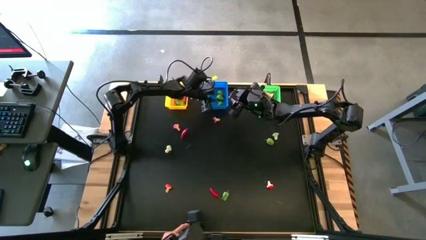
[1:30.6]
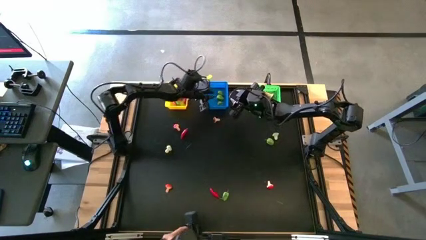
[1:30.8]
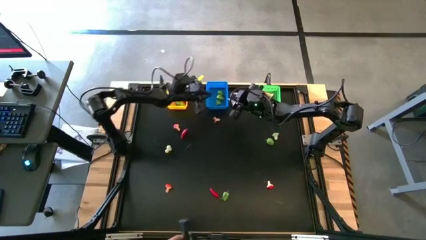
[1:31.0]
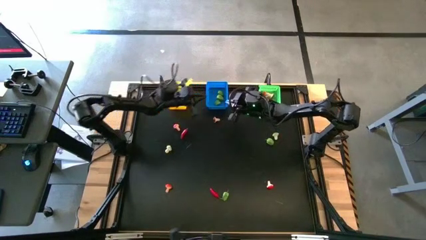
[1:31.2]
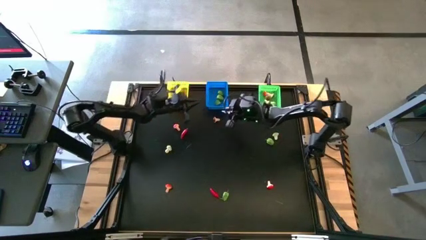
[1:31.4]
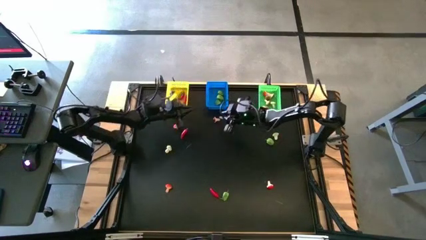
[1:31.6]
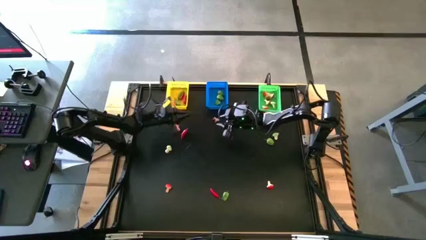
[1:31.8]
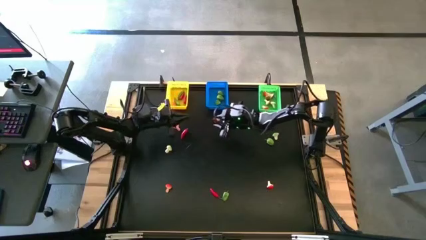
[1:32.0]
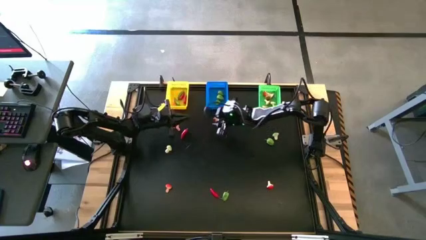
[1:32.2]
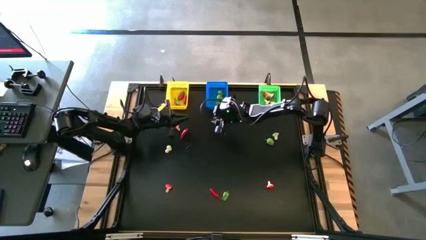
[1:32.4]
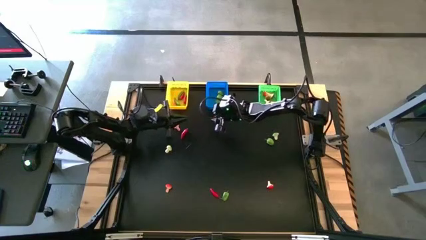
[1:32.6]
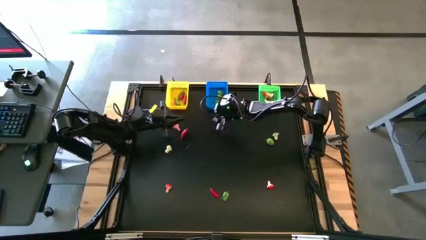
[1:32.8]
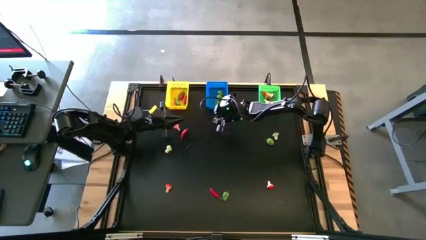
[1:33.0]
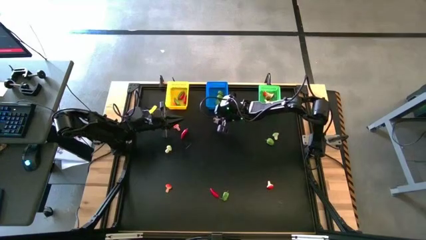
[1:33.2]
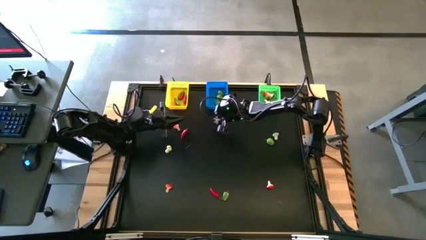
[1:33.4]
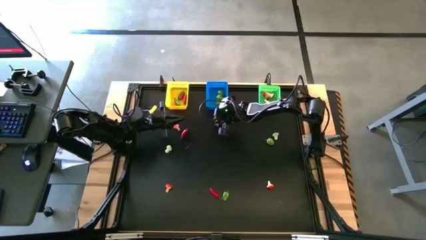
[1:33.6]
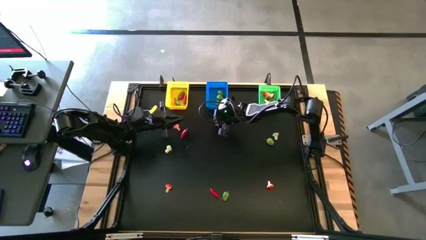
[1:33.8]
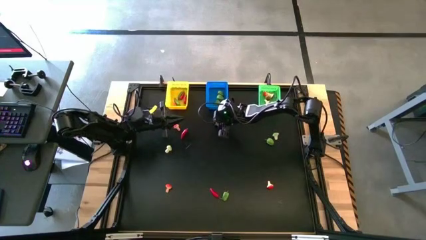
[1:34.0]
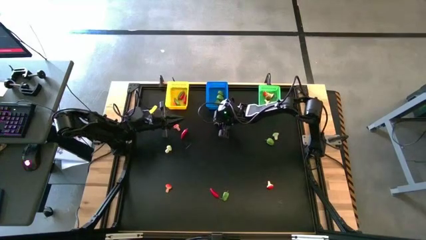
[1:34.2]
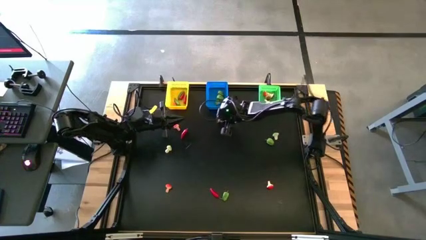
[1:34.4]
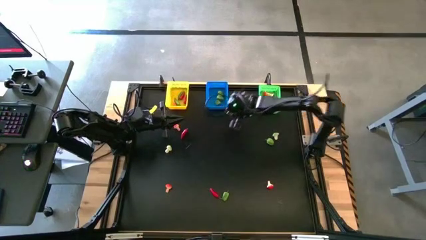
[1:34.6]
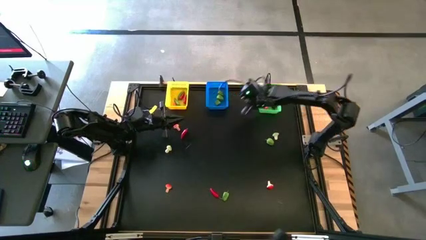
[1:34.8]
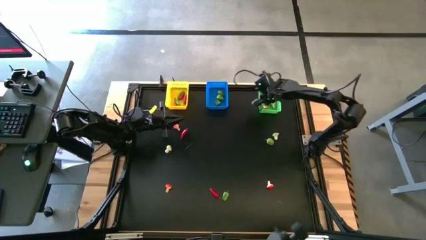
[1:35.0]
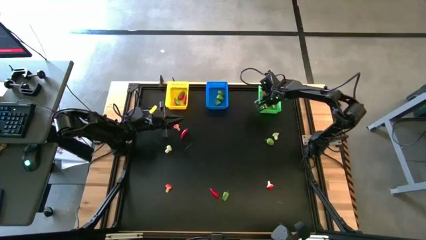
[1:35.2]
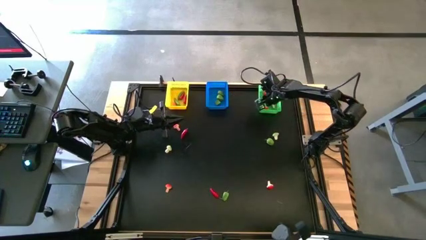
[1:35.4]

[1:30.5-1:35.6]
Task: Sort produce into baskets
Put the brown mushroom into the green bin

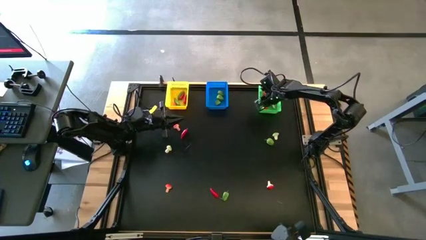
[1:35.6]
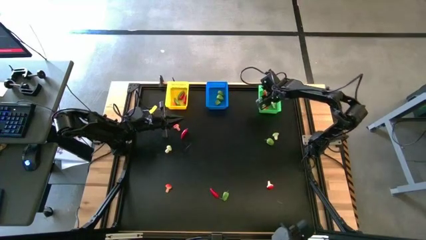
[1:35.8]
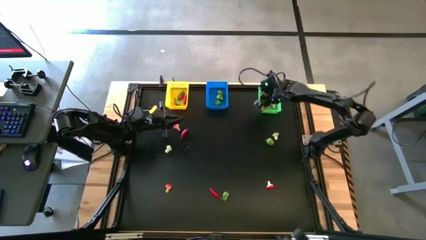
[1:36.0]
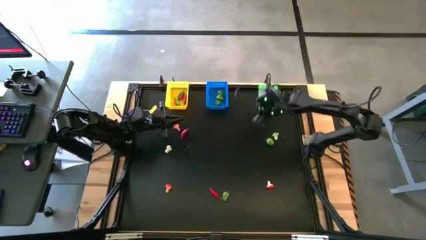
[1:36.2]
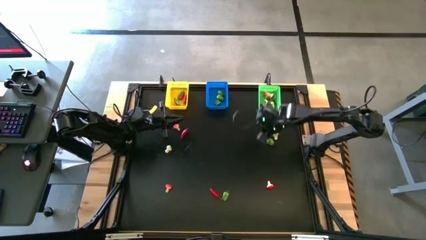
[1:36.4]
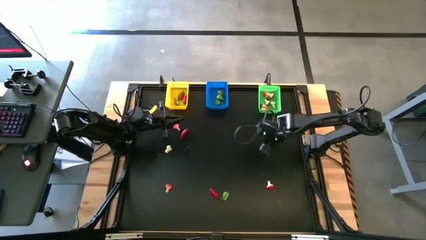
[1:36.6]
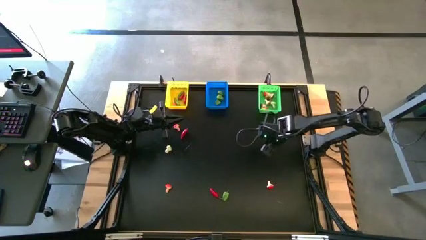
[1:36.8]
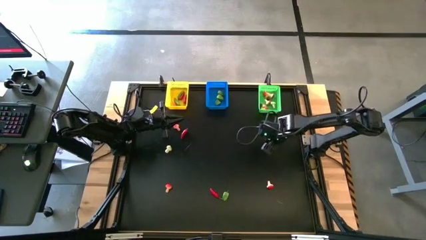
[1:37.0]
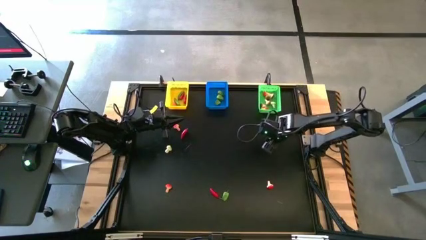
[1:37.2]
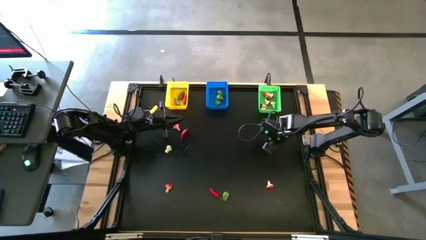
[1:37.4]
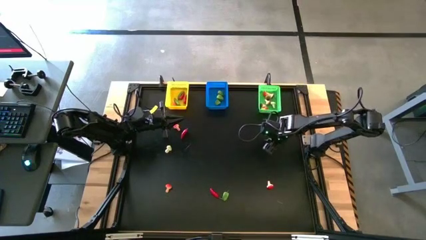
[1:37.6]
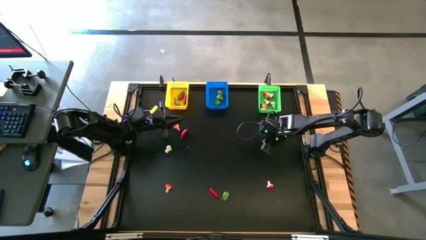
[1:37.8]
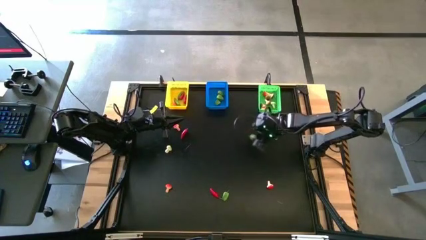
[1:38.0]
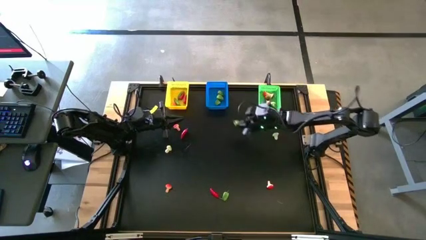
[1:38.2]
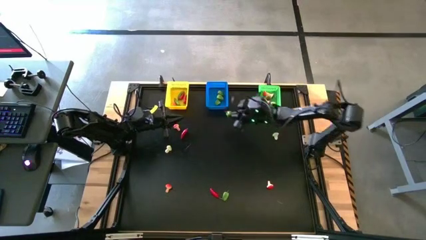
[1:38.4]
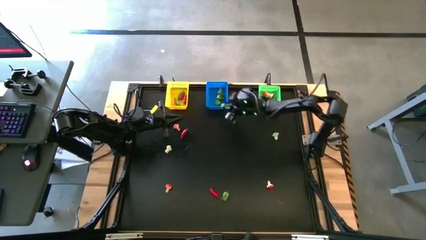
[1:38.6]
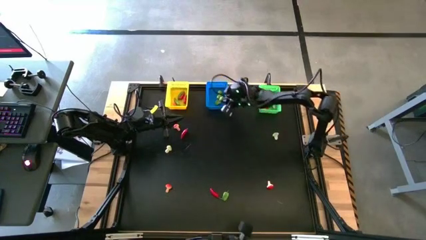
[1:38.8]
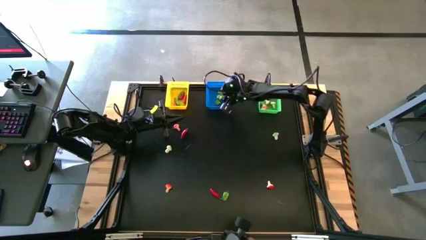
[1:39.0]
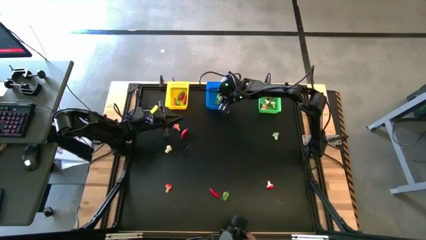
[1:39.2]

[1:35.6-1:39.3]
Put the green chili pepper into the blue bin

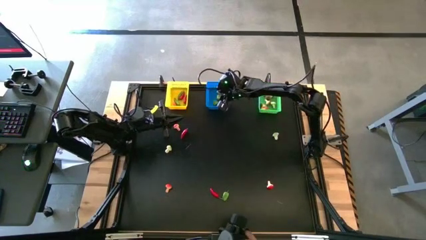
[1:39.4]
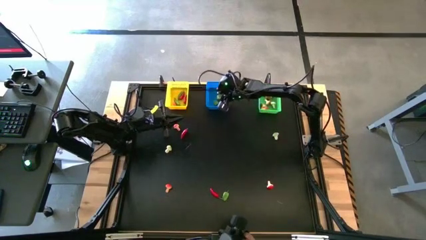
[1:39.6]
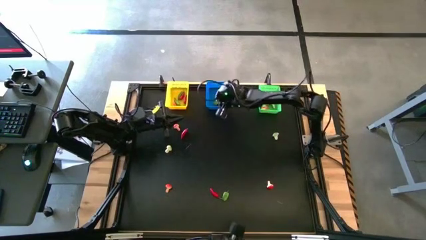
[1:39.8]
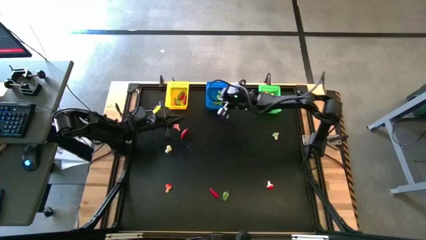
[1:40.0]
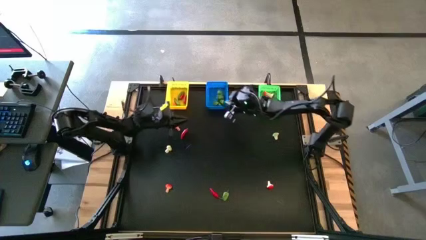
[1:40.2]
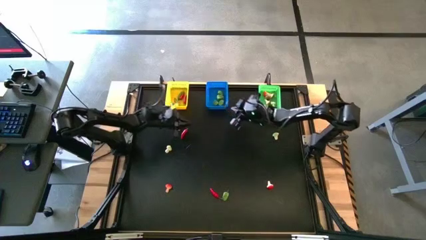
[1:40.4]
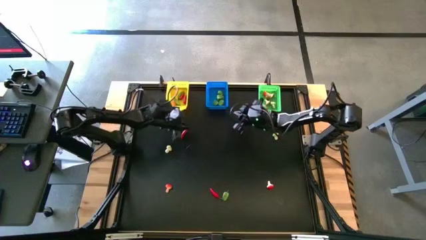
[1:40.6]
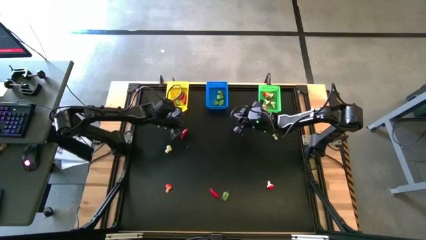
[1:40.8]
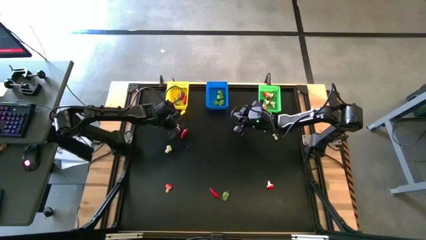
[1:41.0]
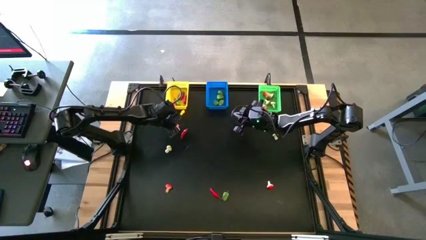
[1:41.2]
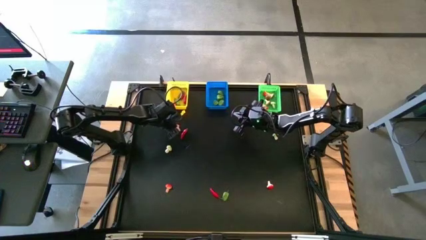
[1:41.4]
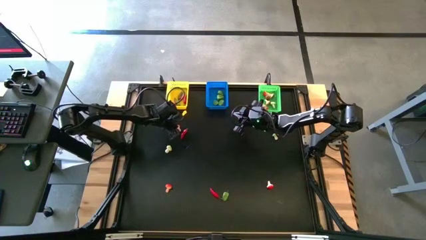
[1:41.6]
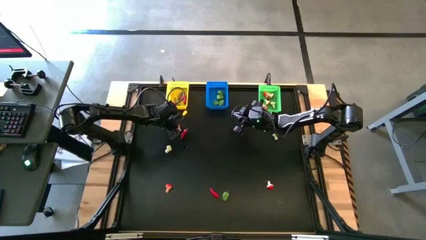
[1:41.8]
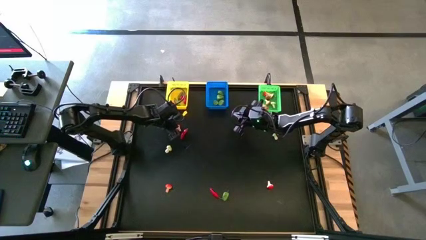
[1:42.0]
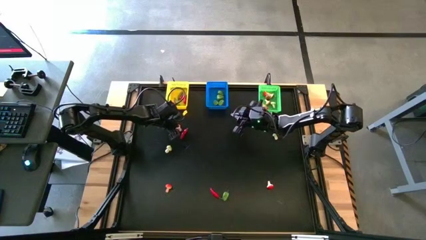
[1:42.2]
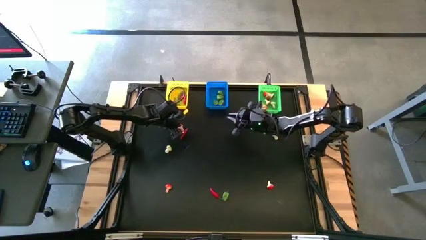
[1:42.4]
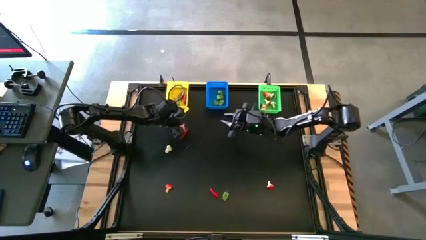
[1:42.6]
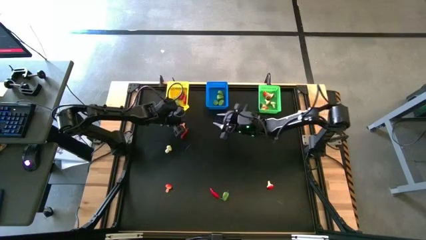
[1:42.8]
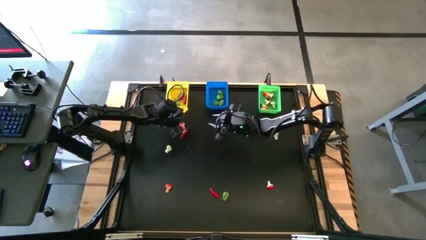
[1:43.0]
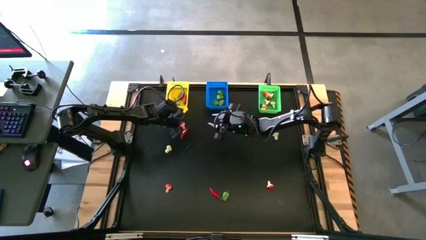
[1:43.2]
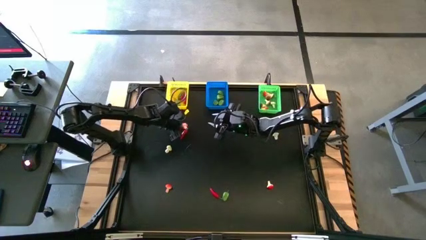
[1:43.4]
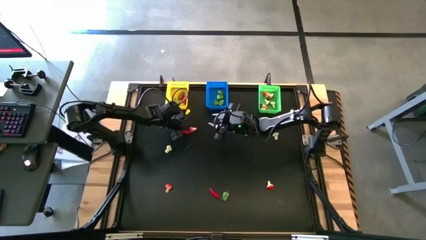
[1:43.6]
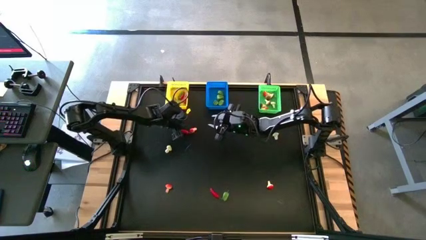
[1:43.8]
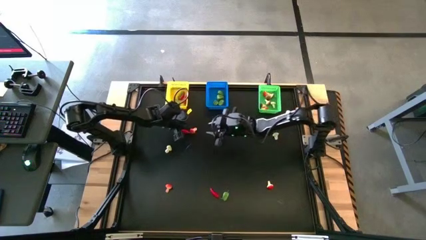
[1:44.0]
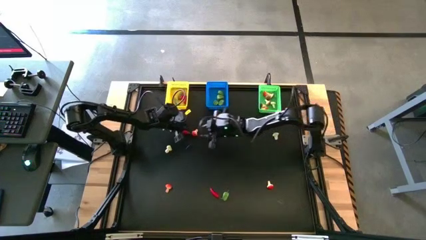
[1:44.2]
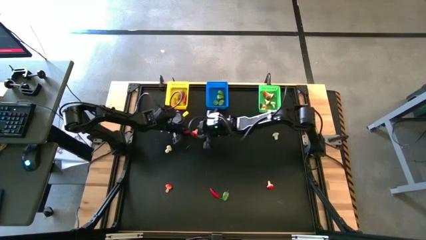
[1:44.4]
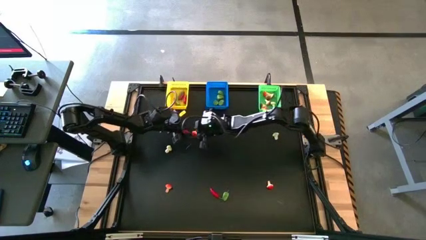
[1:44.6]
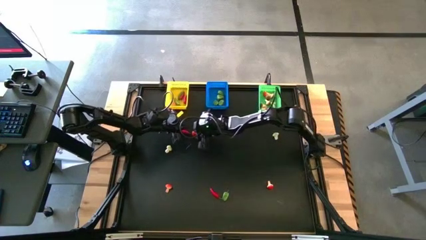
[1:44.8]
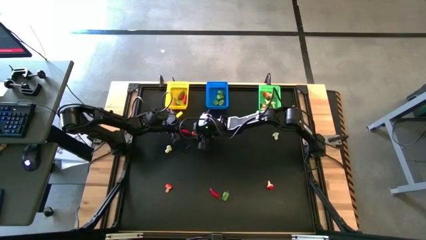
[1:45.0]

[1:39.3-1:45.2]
Put the orange mushroom into the green bin

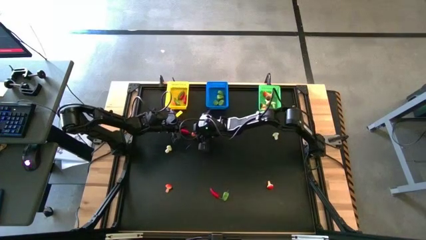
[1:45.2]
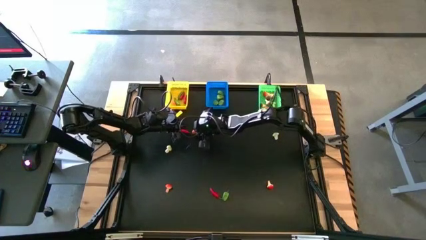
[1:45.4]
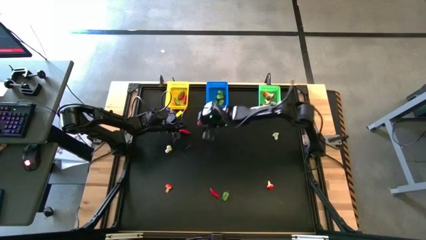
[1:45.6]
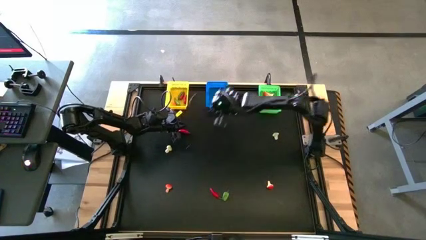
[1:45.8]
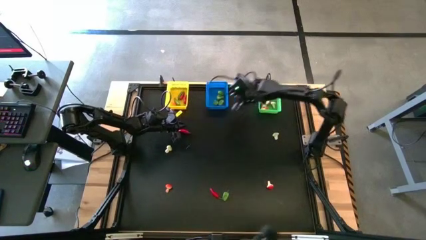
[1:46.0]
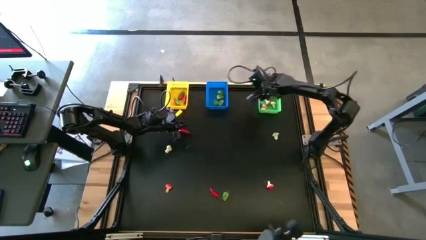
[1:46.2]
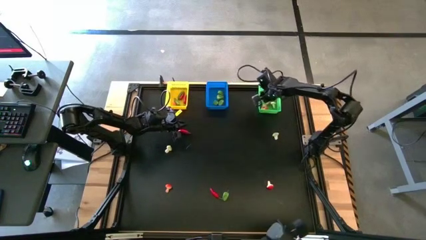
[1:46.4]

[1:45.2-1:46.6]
Put the orange mushroom into the green bin
